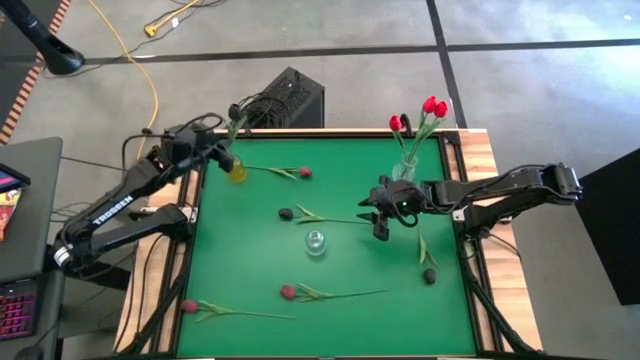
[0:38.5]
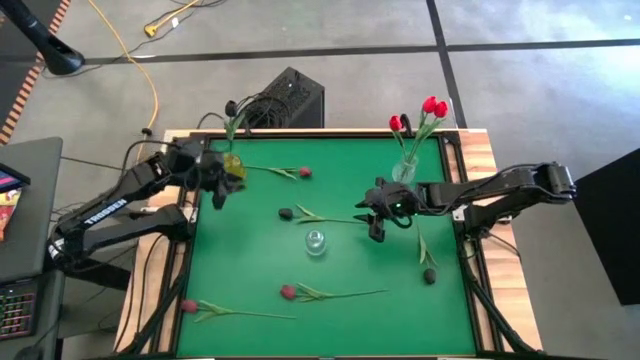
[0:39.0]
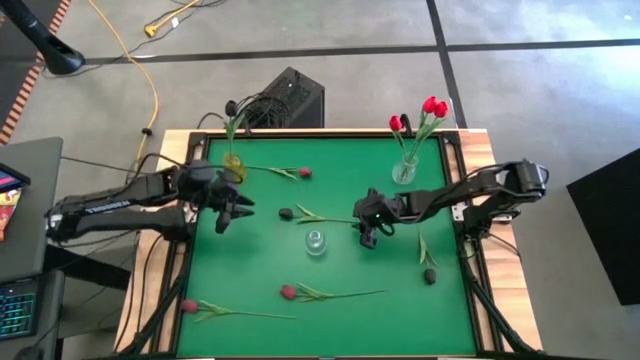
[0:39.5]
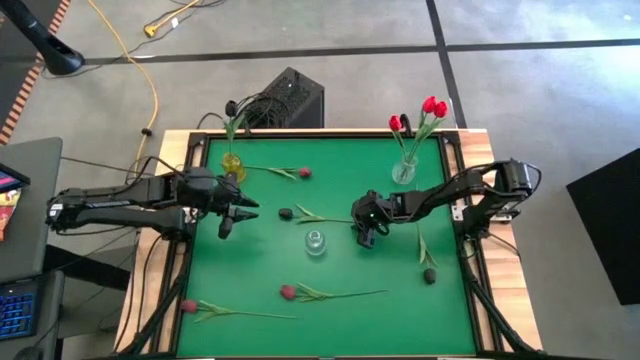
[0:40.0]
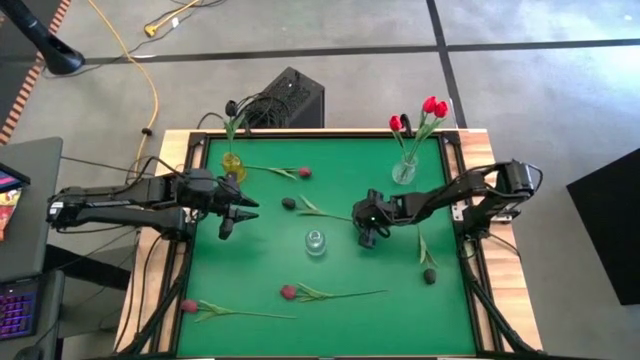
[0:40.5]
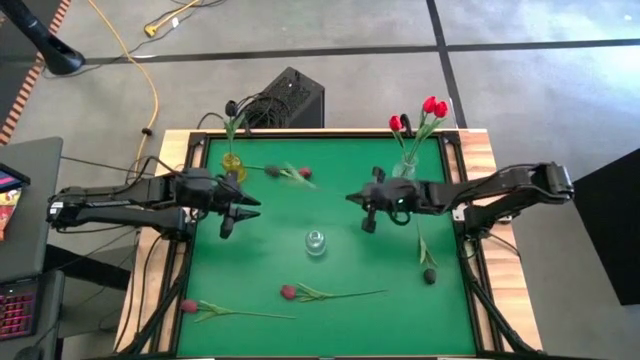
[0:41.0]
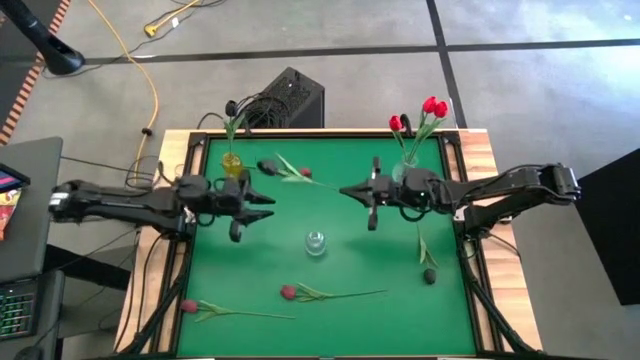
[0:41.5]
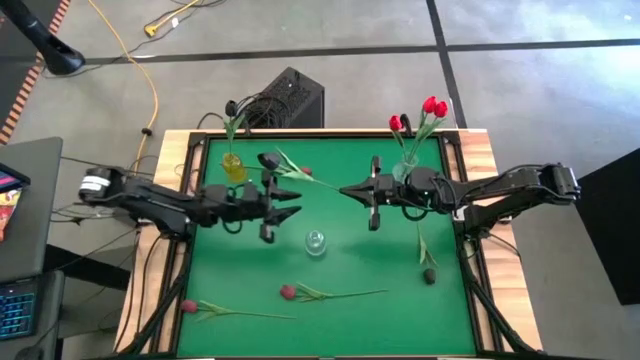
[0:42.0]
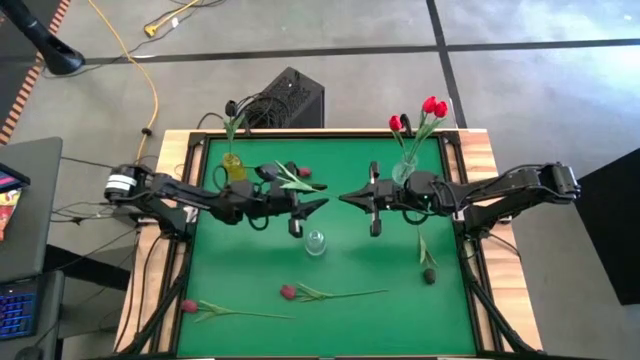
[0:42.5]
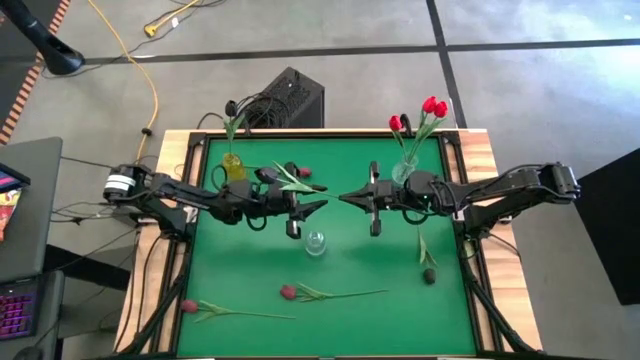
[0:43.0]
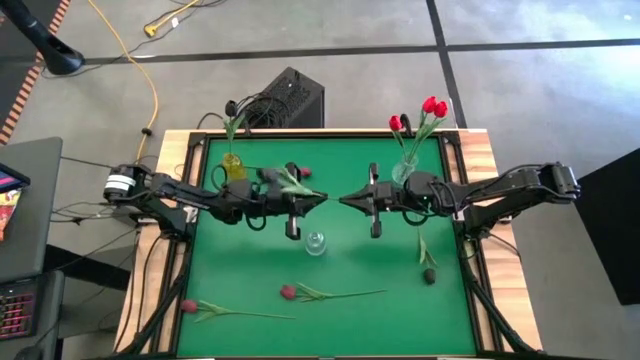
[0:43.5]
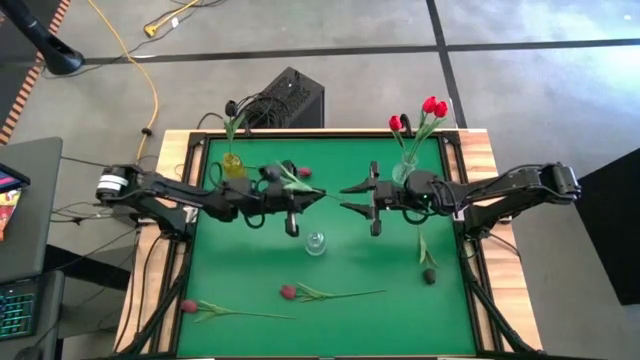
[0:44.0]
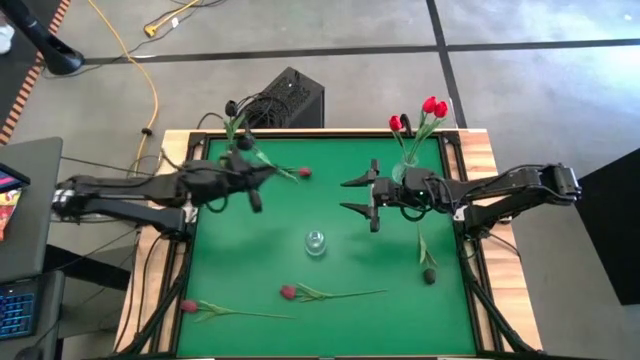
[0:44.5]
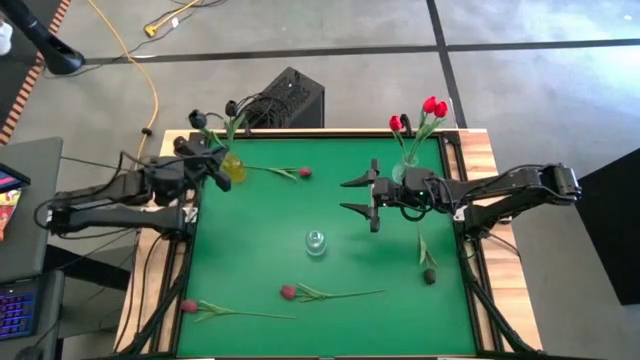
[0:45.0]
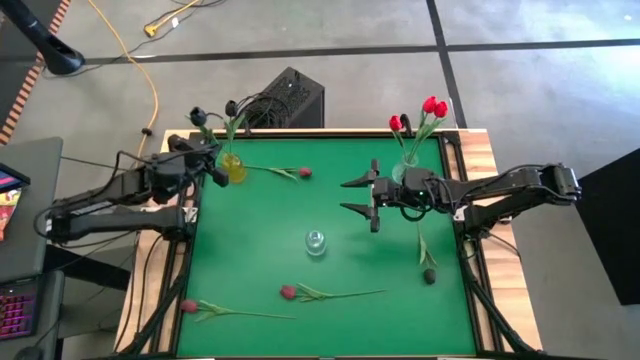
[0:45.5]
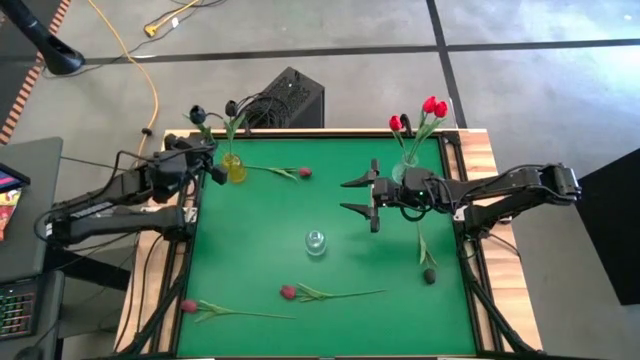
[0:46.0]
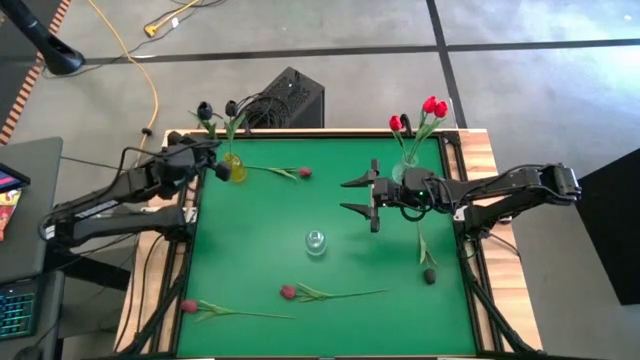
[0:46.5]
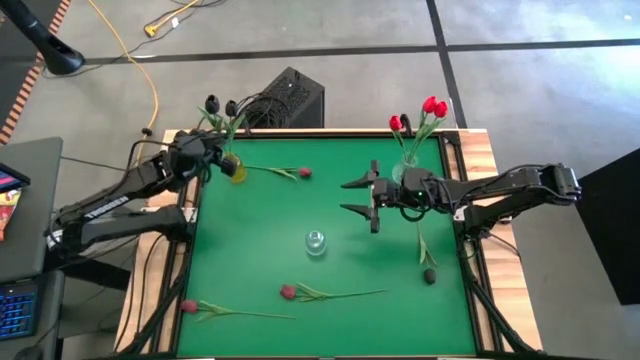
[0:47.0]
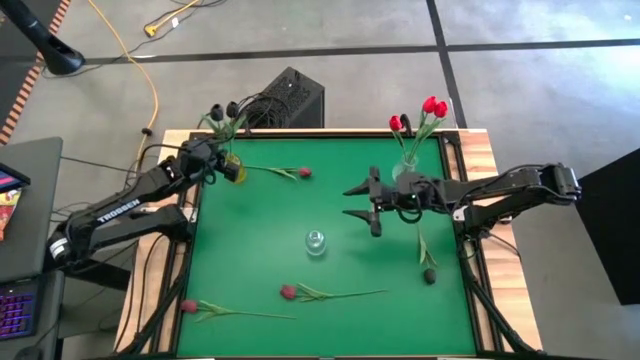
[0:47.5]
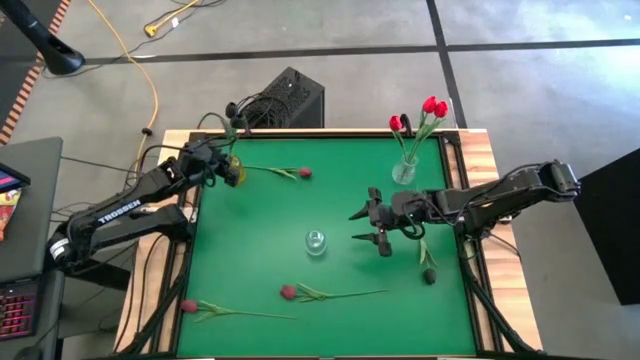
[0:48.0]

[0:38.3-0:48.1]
Task: Sort flowers into vase by color
Put the left black tulip into the yellow vase

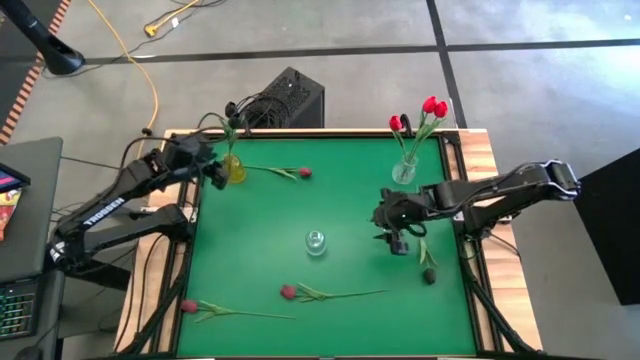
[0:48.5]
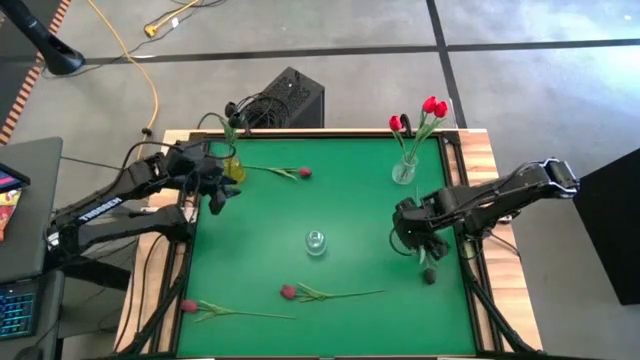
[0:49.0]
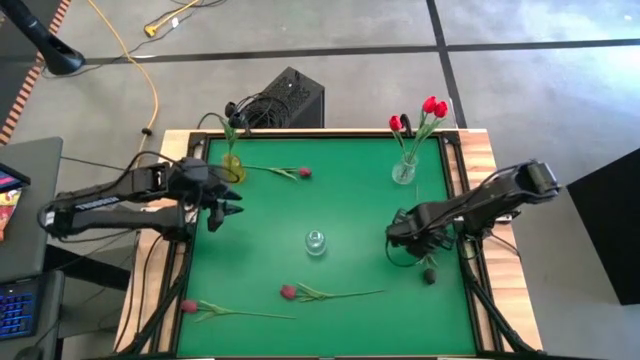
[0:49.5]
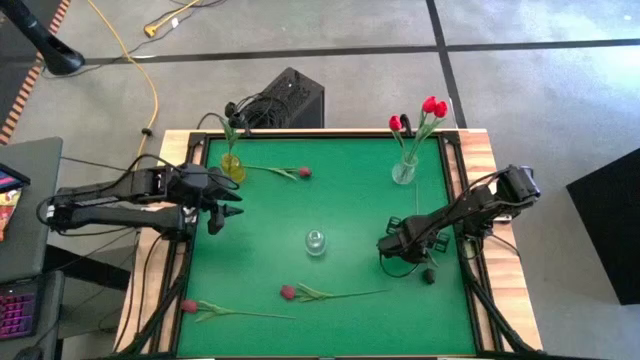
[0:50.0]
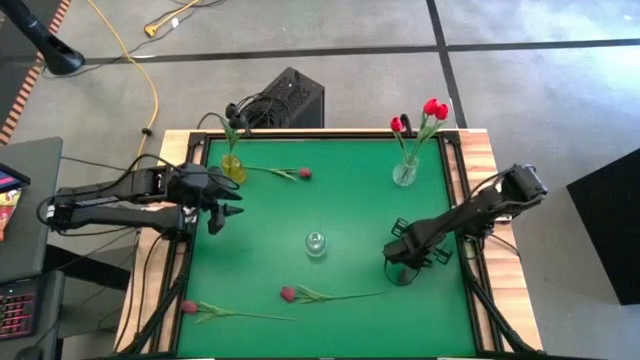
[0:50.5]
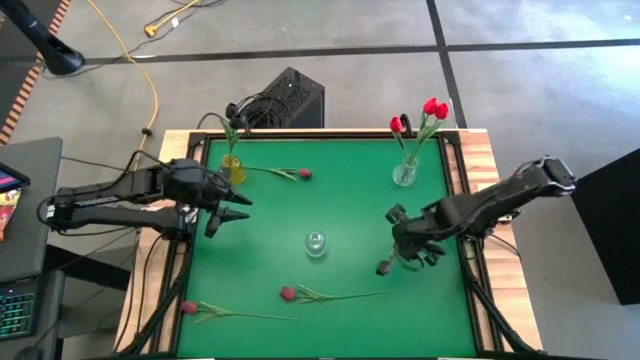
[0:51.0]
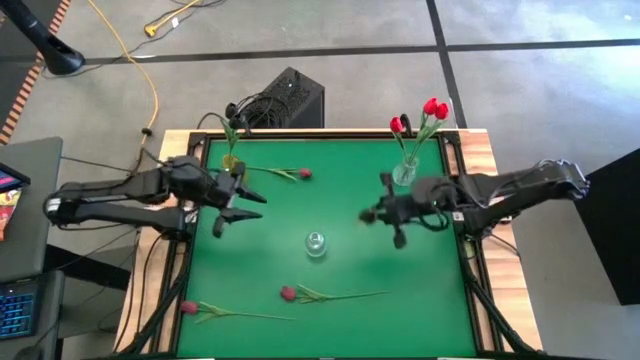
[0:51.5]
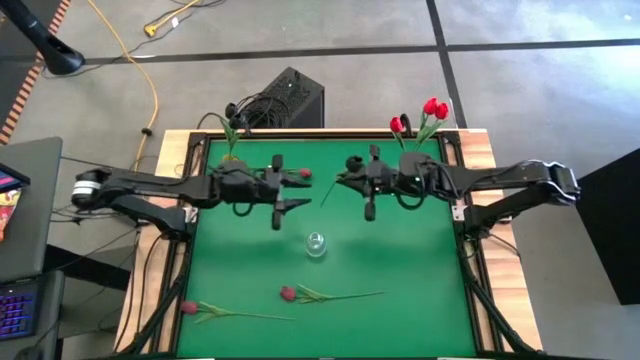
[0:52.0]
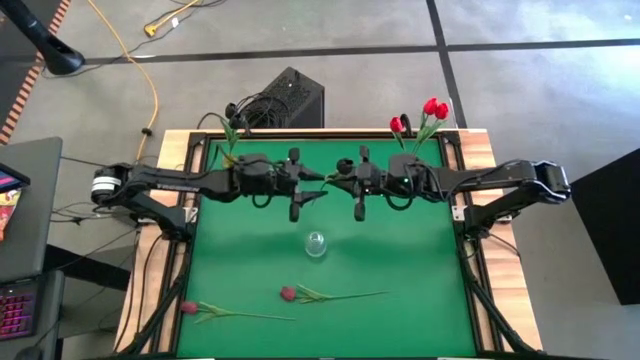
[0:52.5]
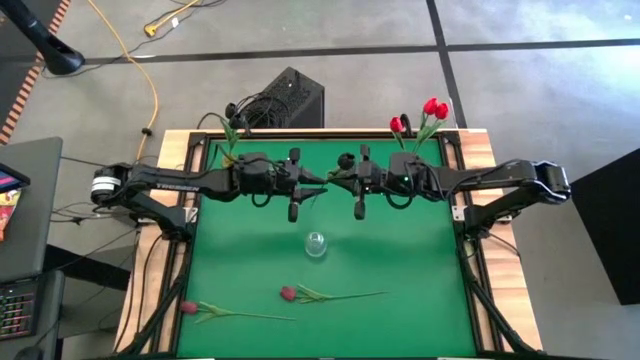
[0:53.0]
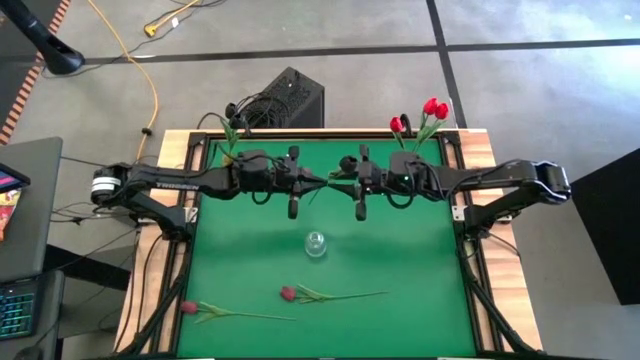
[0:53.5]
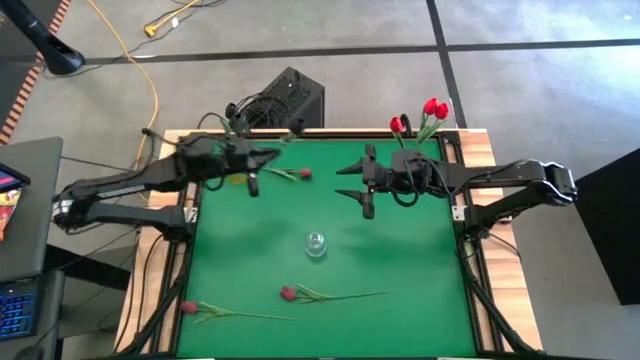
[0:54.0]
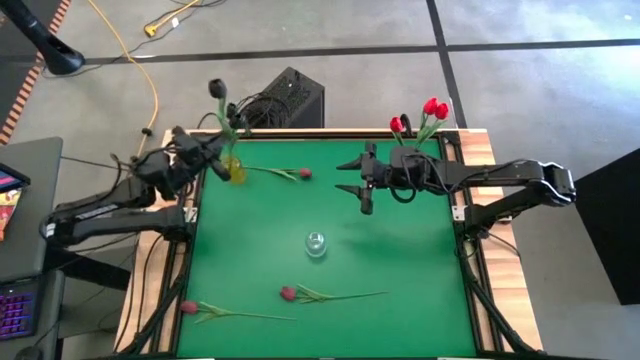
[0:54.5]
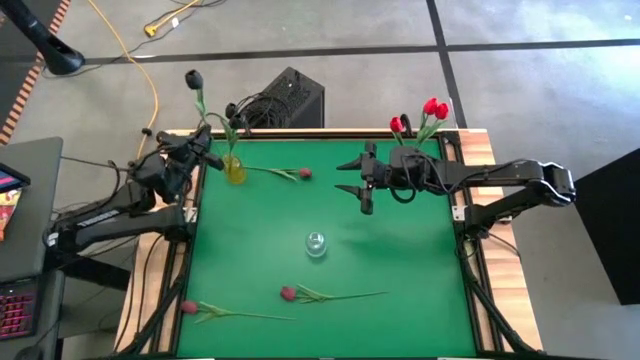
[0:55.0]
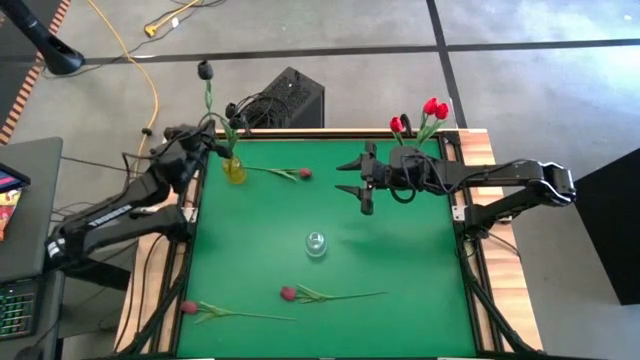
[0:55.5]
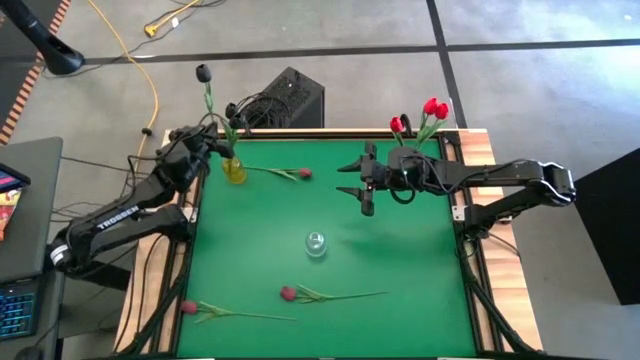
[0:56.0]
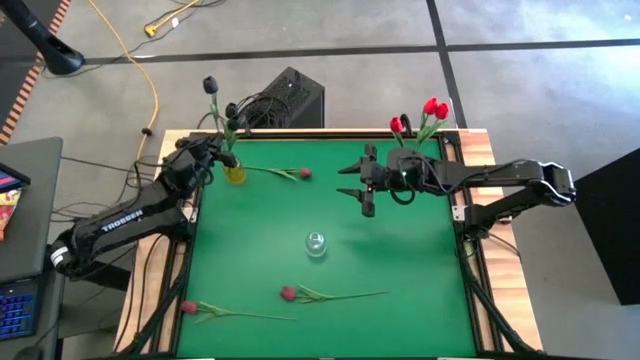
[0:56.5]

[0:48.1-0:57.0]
Put the black tulip into the yellow vase

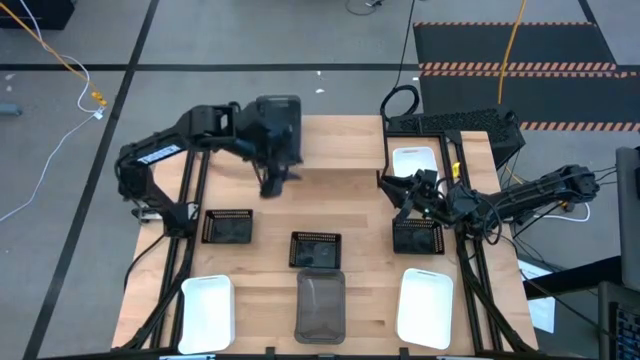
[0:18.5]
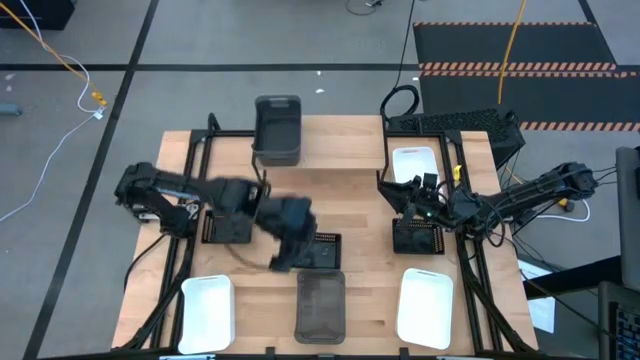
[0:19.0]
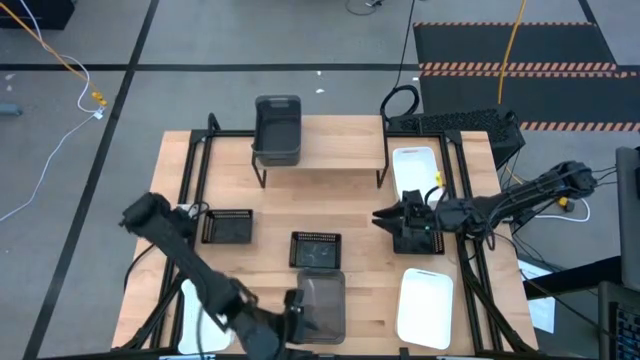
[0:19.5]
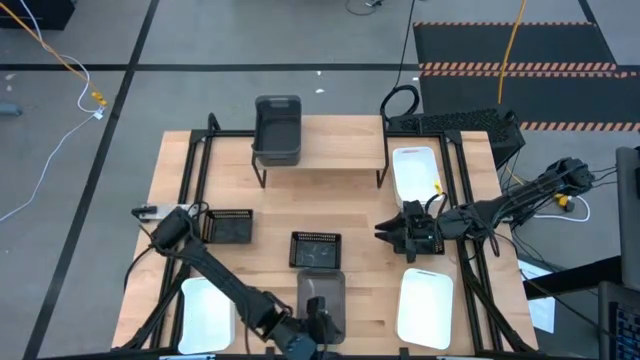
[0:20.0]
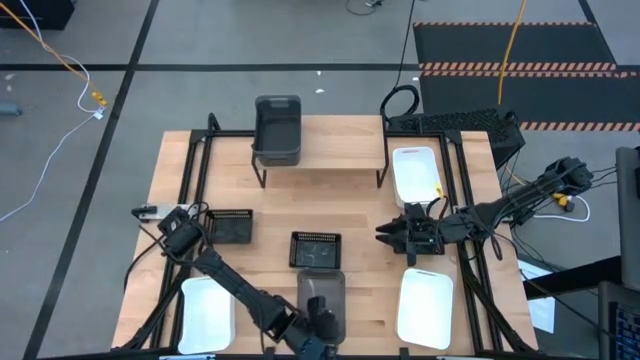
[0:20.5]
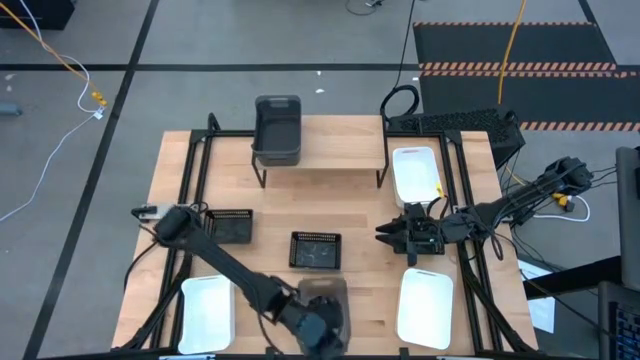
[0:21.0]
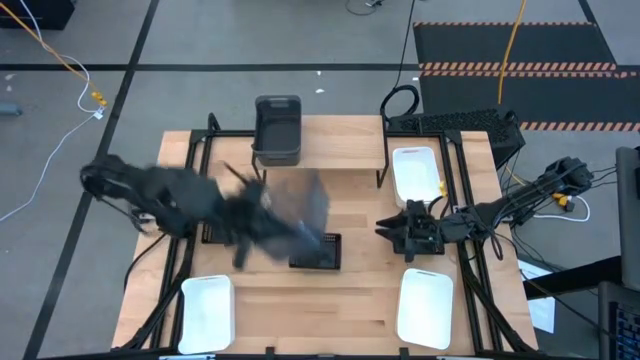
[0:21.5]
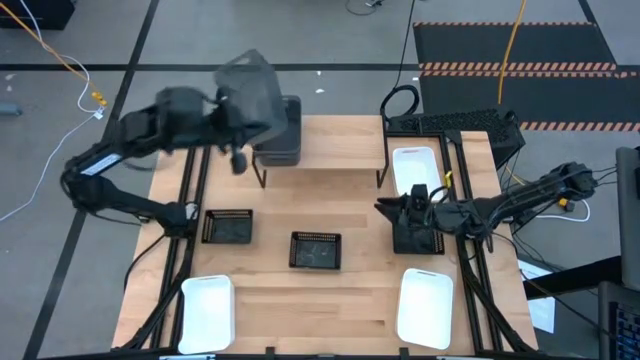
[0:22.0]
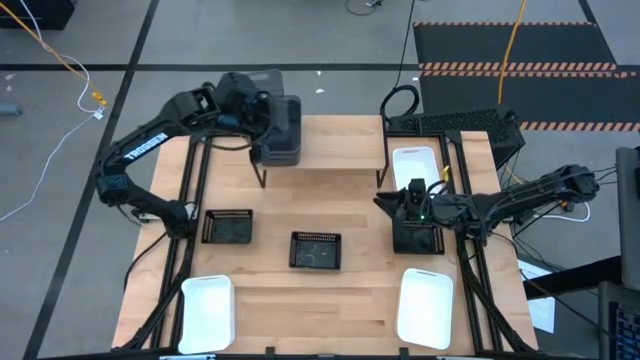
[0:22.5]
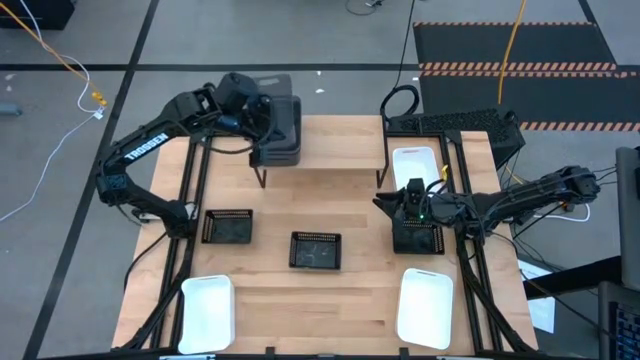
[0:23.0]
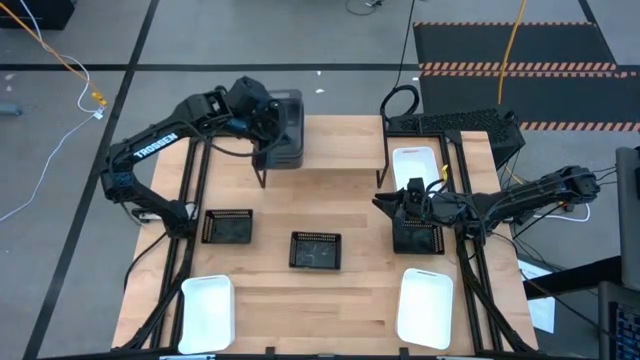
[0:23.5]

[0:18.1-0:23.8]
Task: Stack baskets on shelf by color
Stack the light black bin on the stacked light black bins on the shelf
